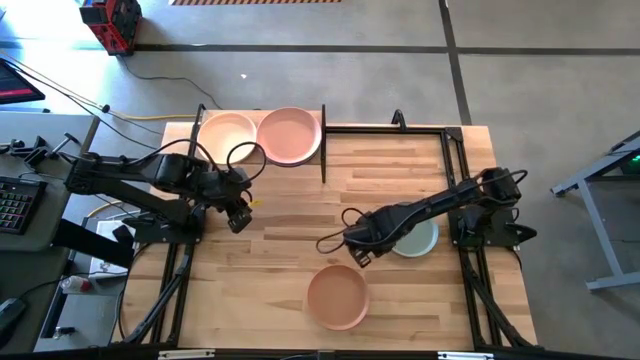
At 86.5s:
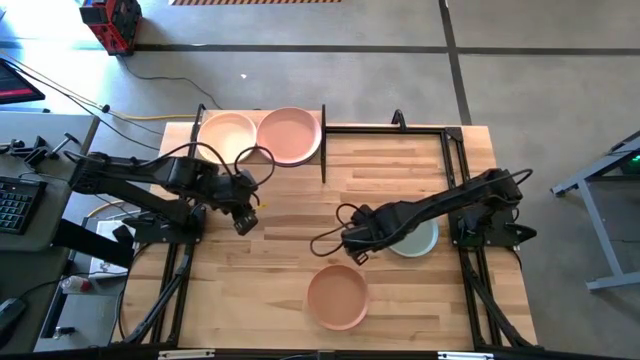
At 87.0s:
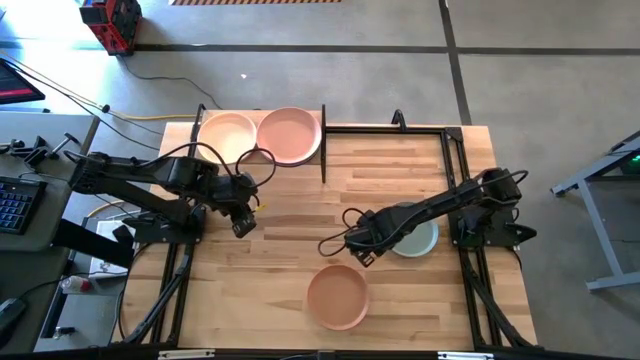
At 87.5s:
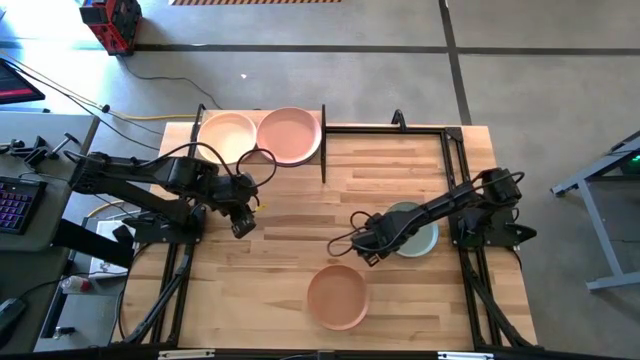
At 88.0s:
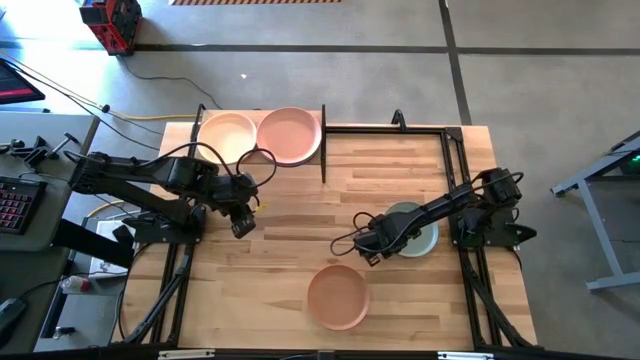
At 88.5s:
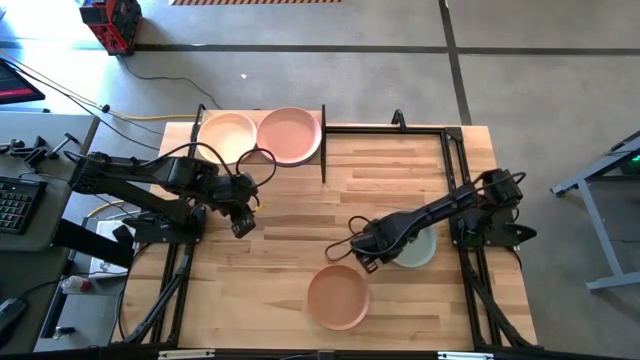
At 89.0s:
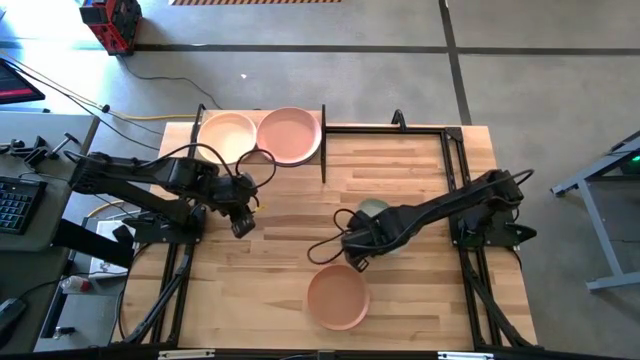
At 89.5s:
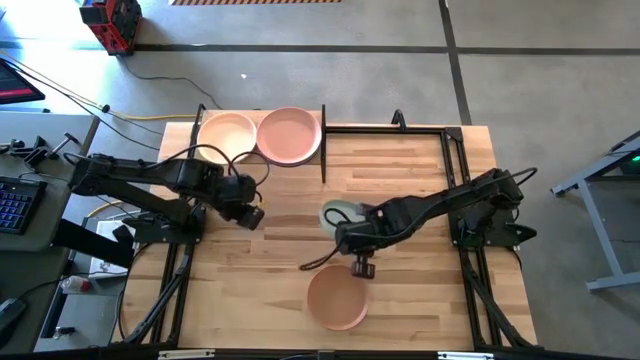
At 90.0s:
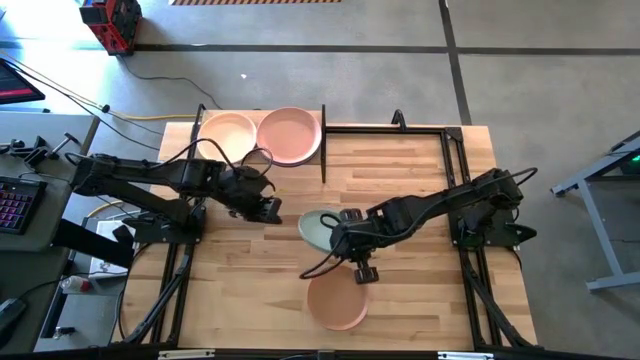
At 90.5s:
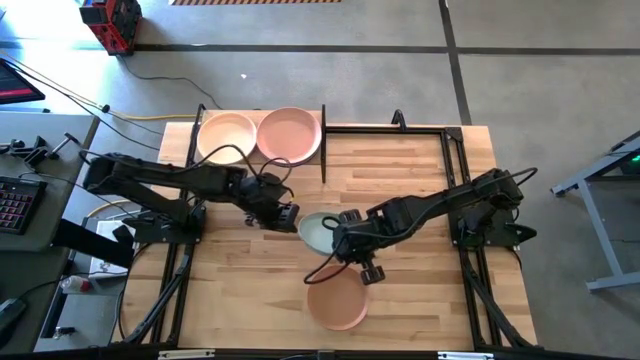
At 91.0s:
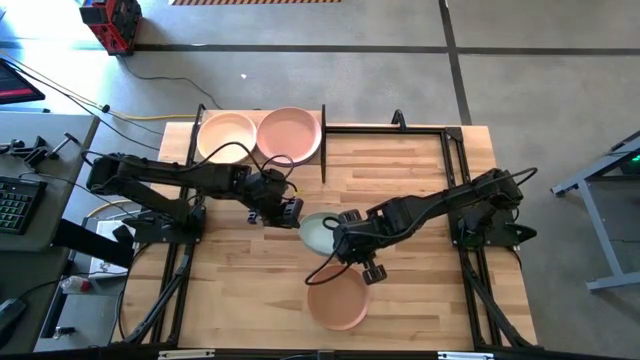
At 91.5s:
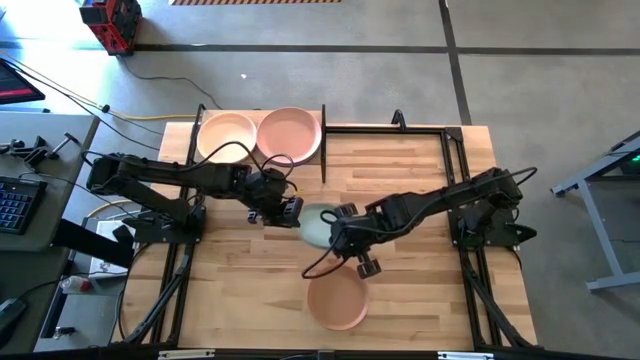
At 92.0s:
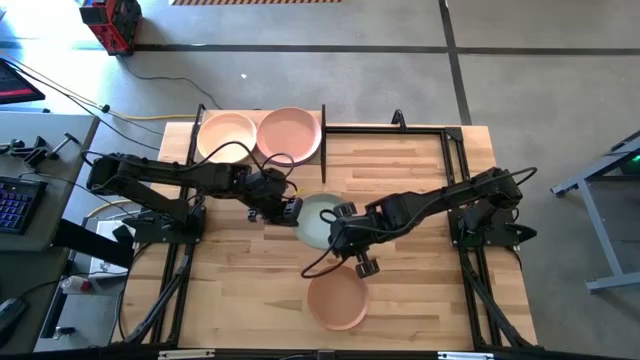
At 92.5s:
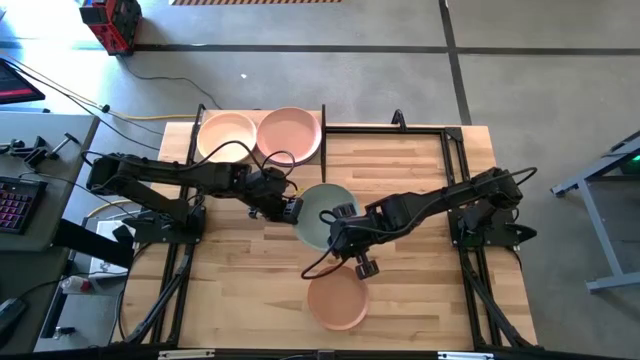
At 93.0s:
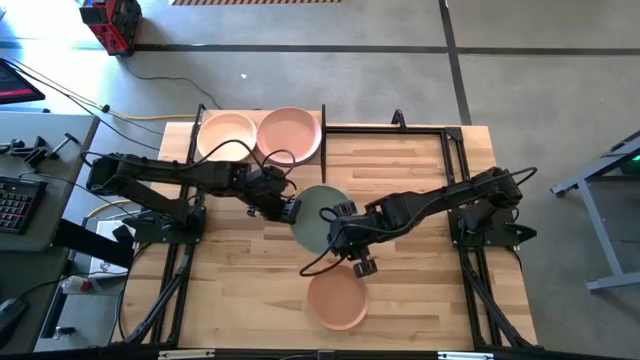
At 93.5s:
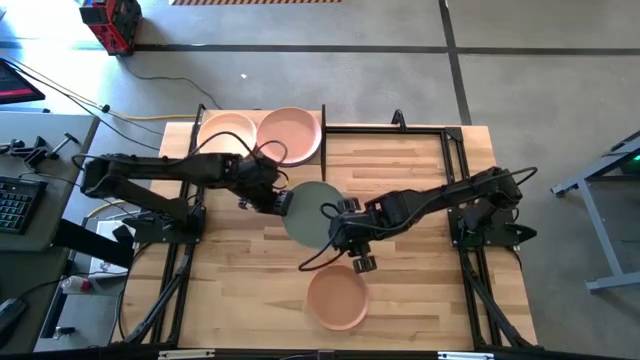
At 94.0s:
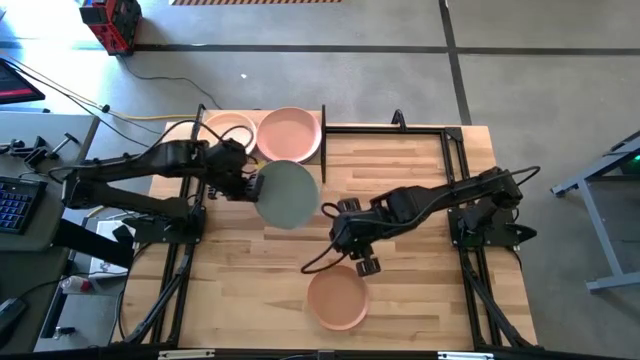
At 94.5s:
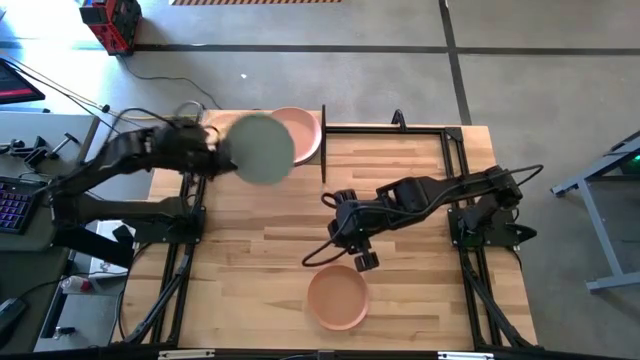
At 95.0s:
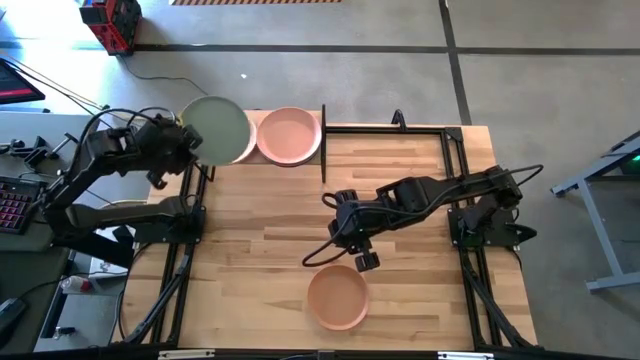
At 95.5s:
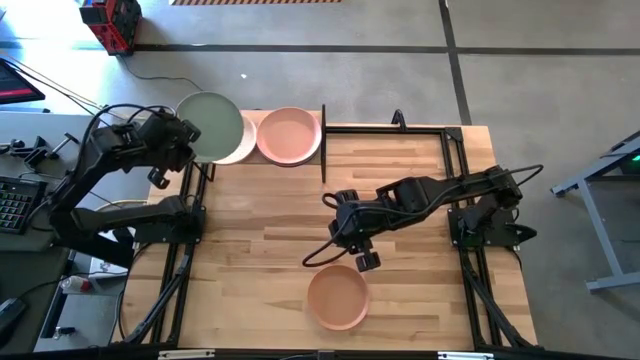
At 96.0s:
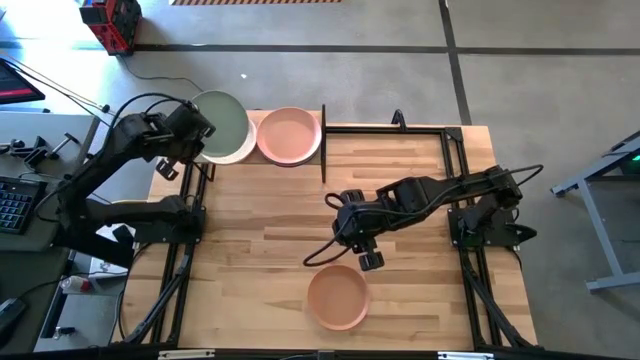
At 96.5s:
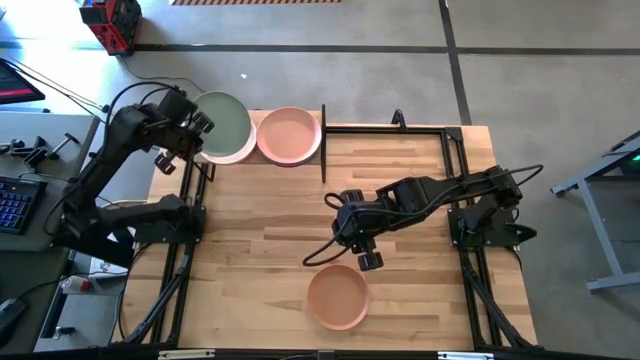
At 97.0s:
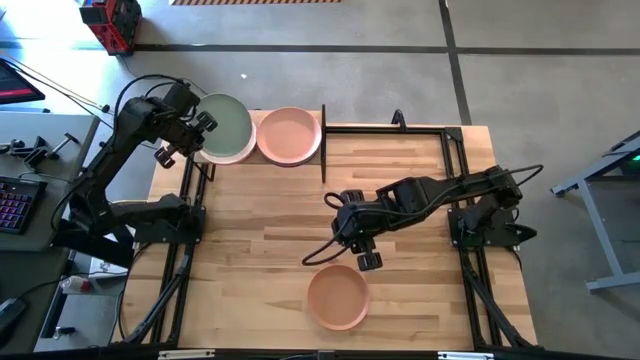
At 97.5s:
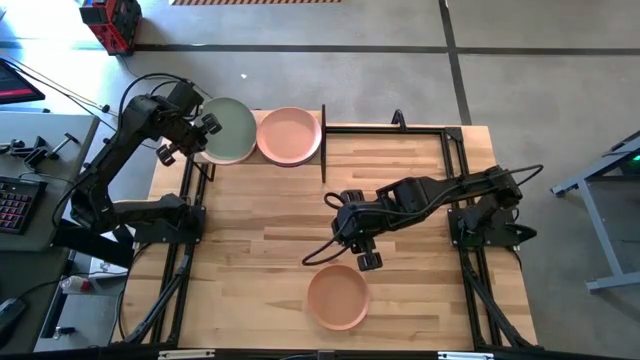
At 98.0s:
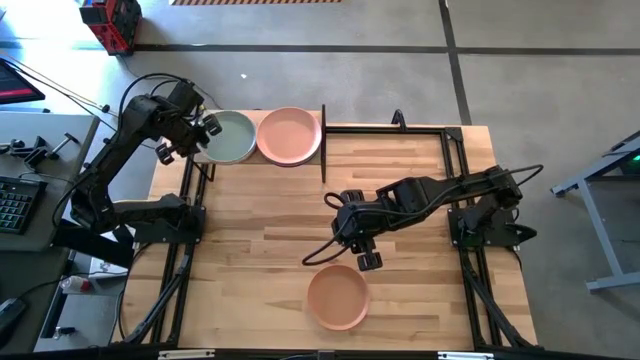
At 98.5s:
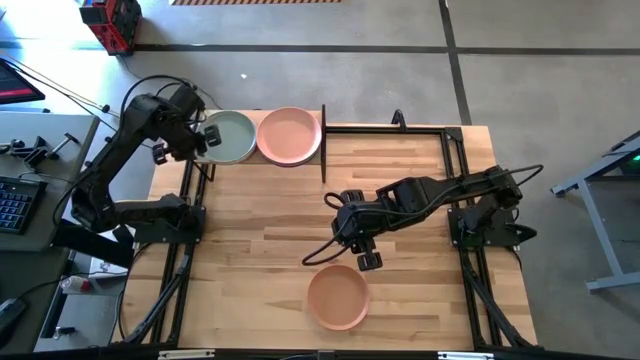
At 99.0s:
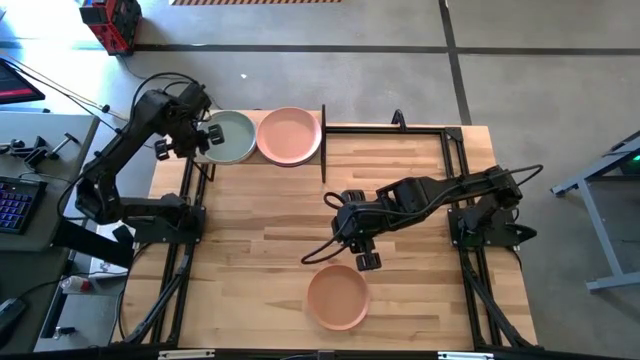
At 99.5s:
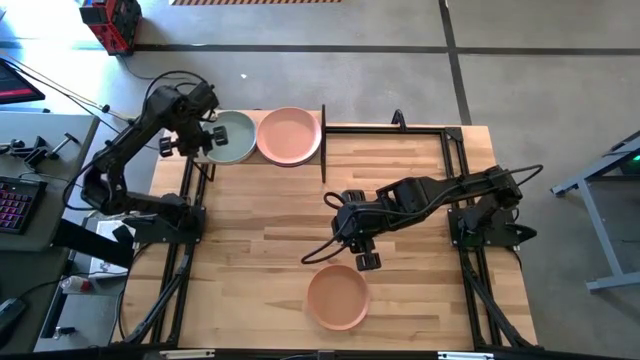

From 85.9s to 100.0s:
Task: Place and stack plates onto a shelf
Stack the light blue plate on top of the white plate on the shelf
